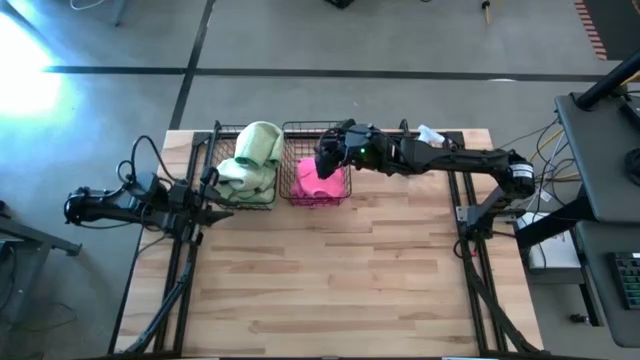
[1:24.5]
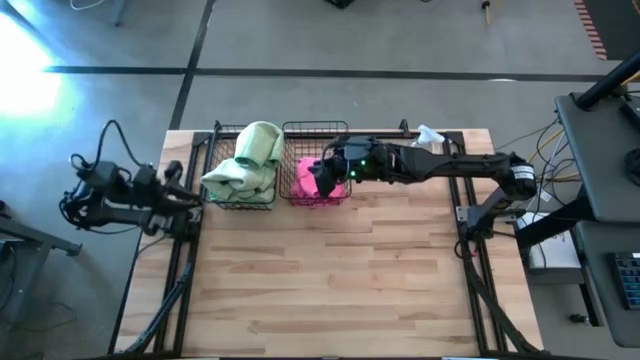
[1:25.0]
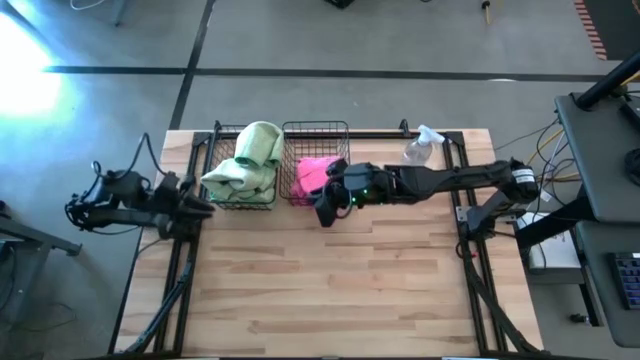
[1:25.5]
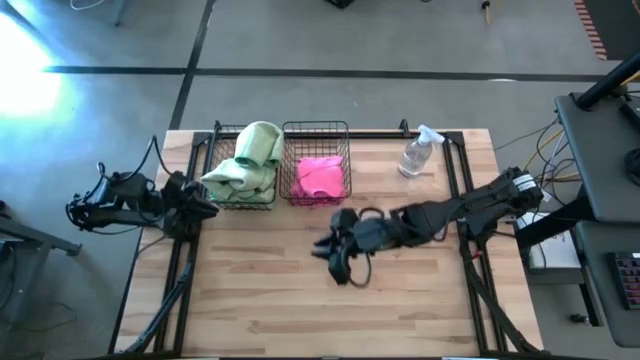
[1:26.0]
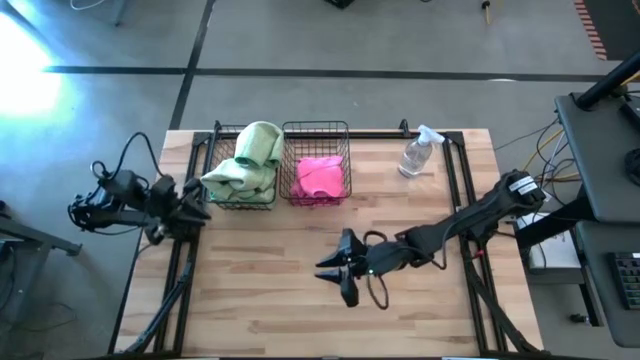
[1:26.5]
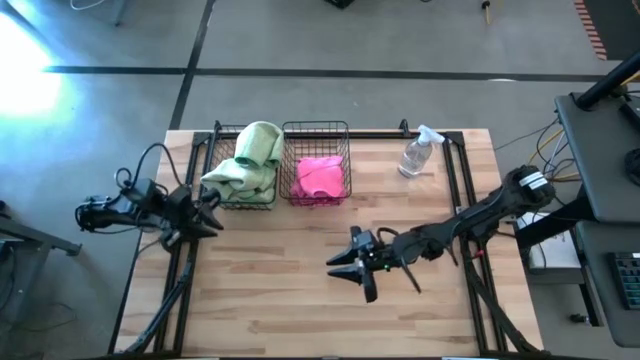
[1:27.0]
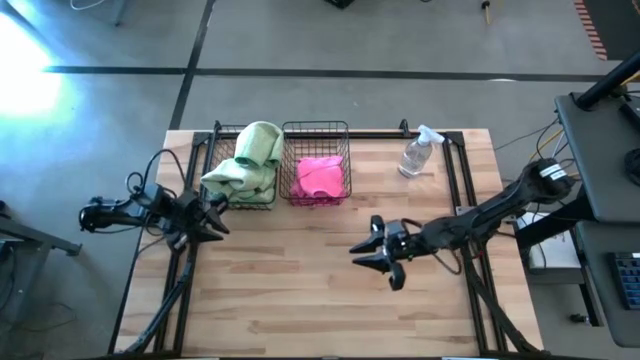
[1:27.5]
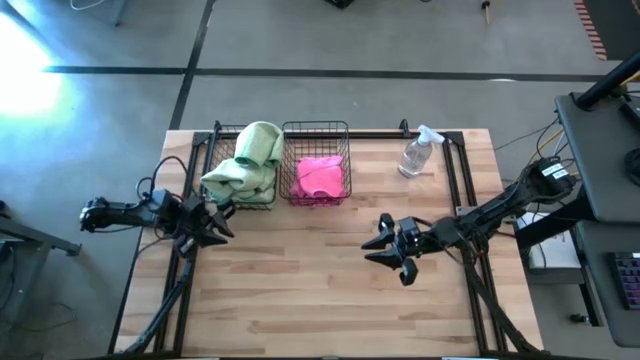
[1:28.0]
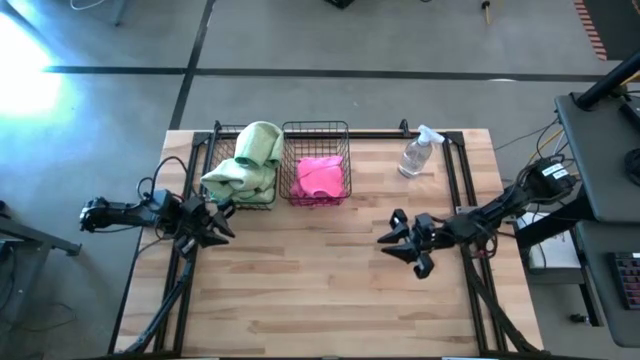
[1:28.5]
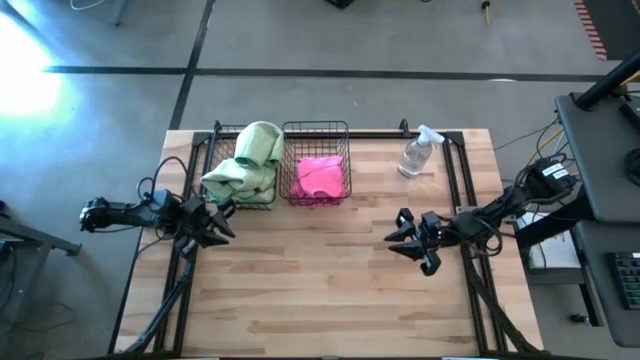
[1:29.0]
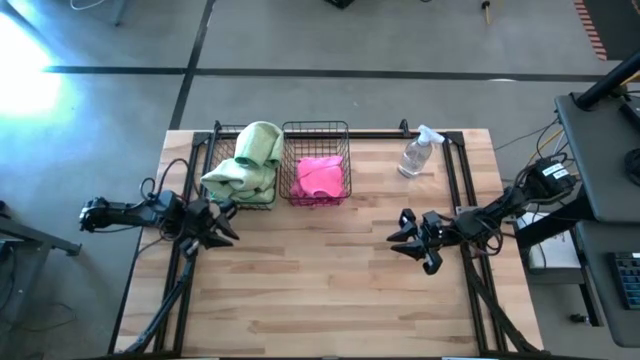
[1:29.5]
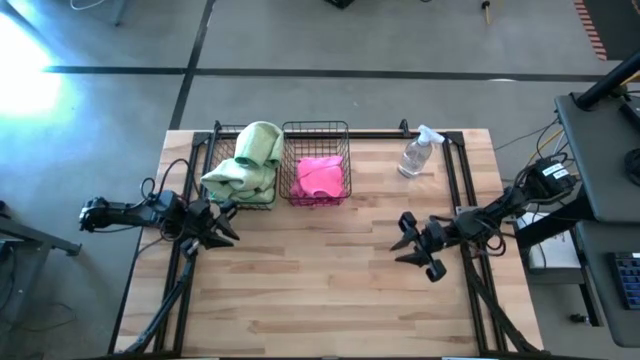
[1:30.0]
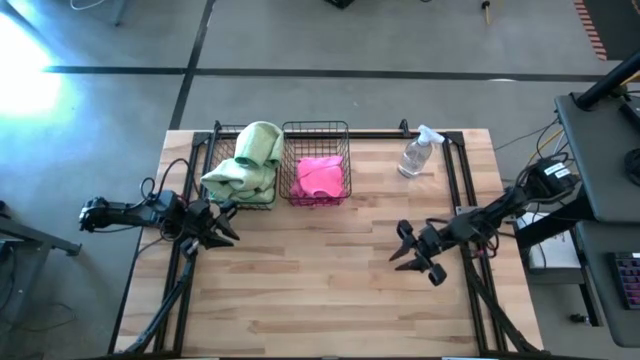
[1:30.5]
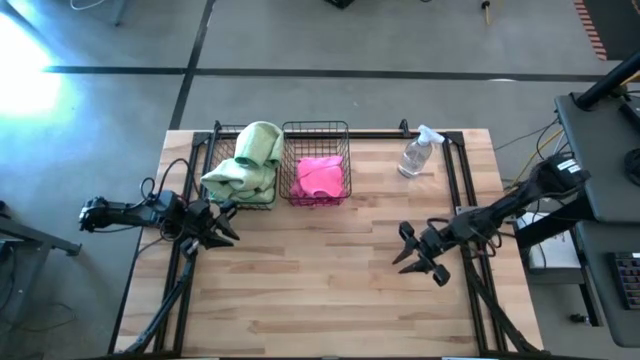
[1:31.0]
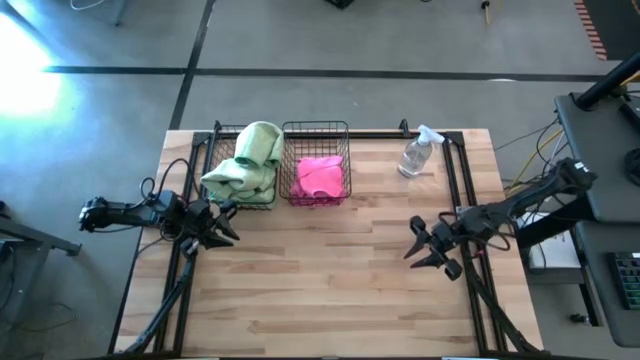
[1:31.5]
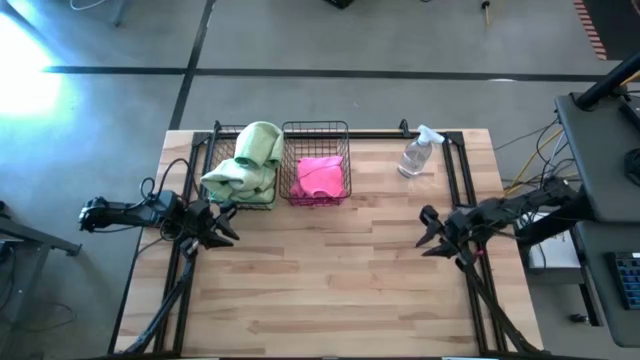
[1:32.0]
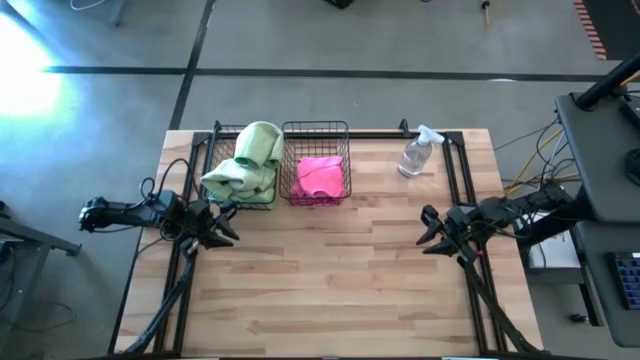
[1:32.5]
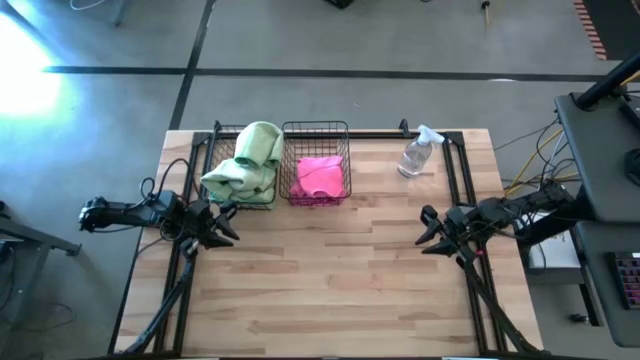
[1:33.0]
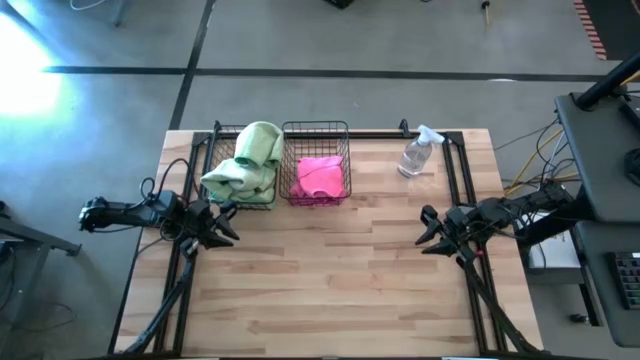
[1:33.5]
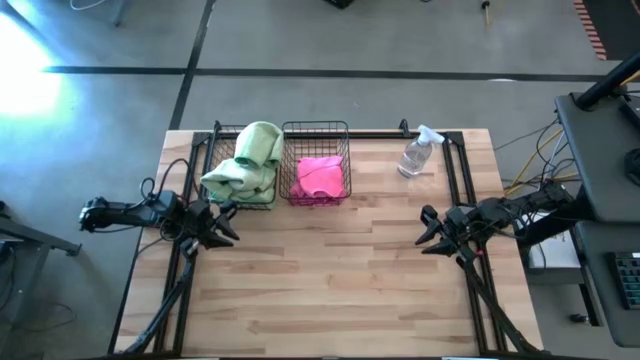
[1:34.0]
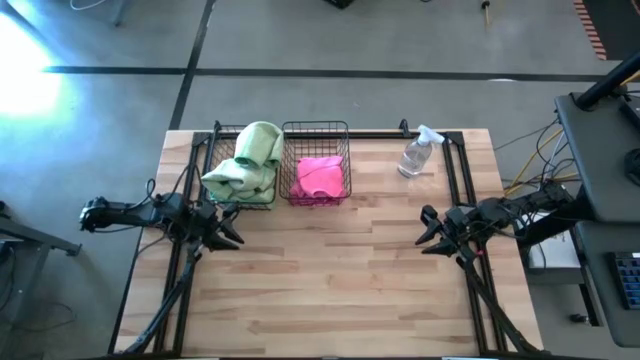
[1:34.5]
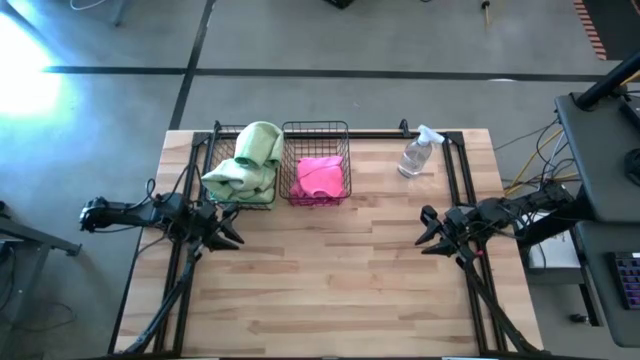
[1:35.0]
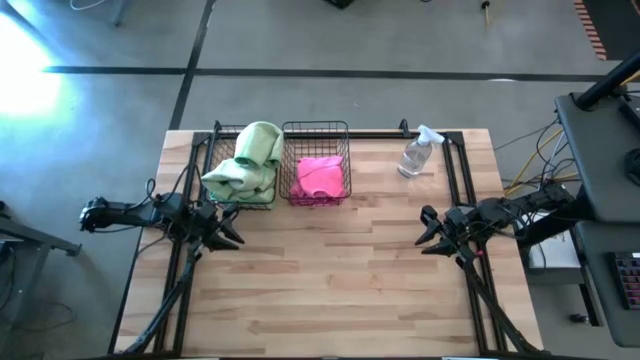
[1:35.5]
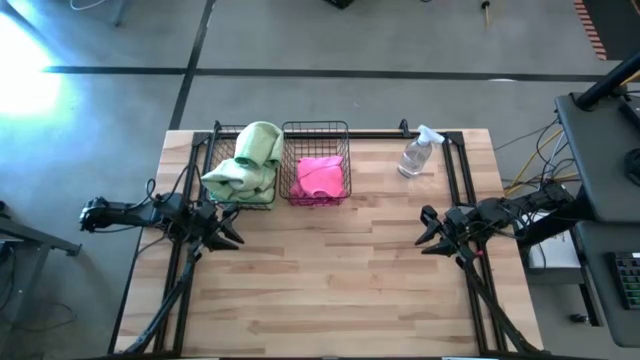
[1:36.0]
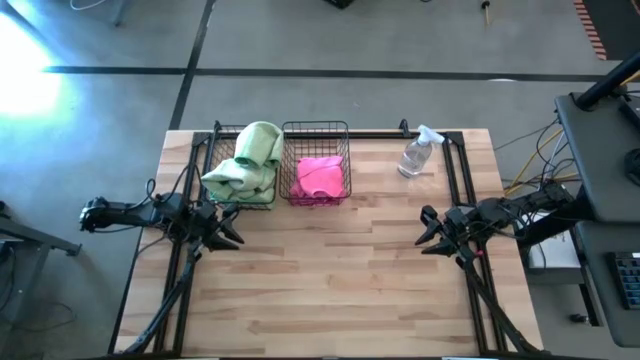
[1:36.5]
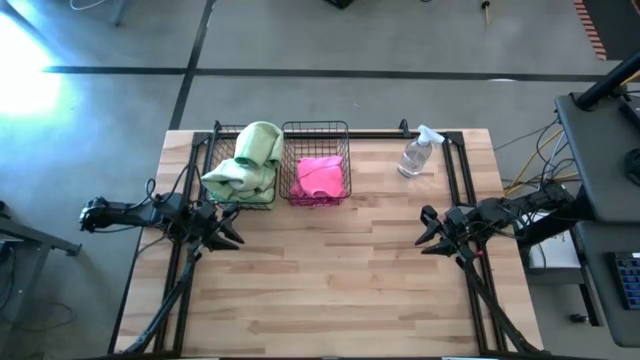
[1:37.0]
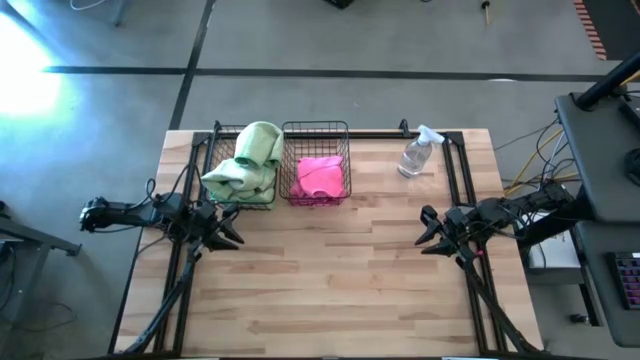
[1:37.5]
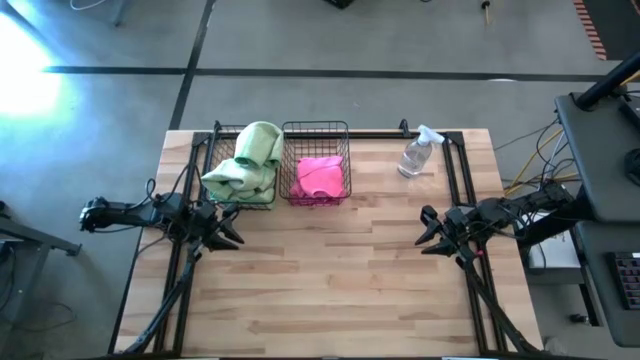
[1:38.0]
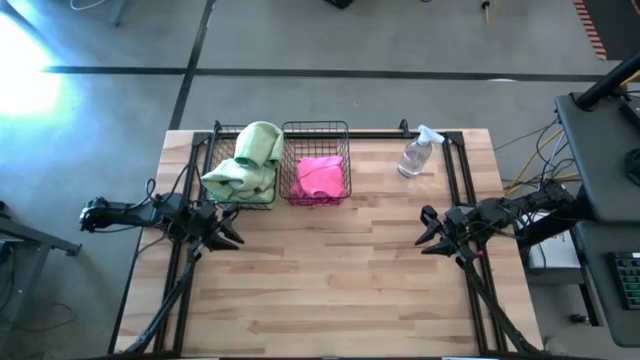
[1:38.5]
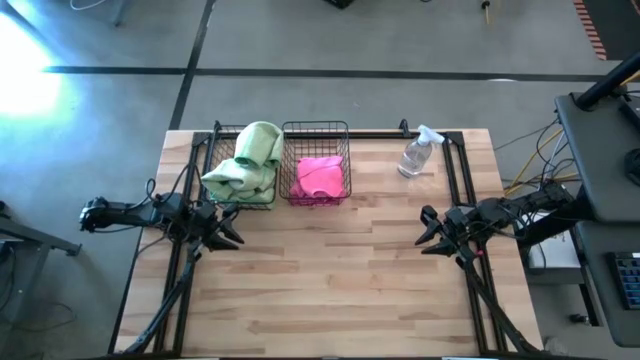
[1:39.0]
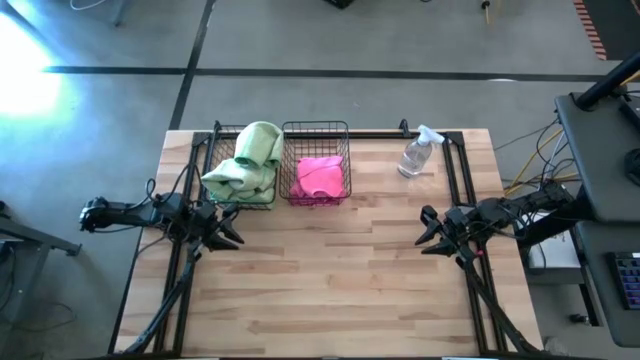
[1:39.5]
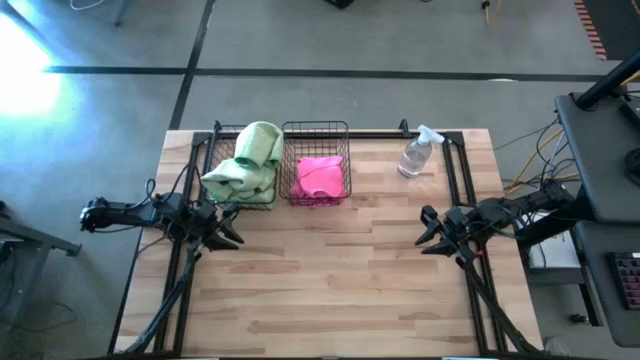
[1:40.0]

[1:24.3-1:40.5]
Task: Sort microfiber towel by color & place in baskets
Return to Home Position

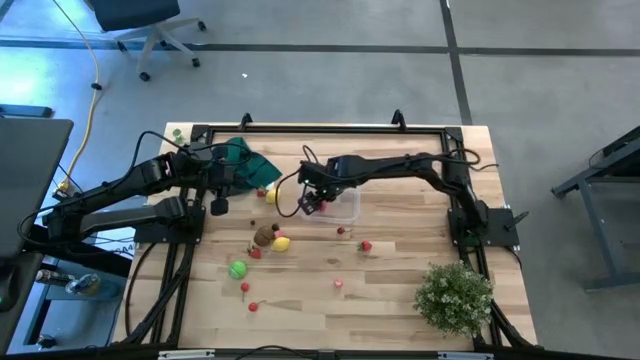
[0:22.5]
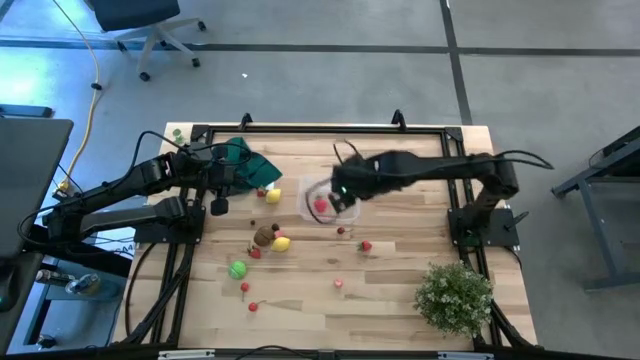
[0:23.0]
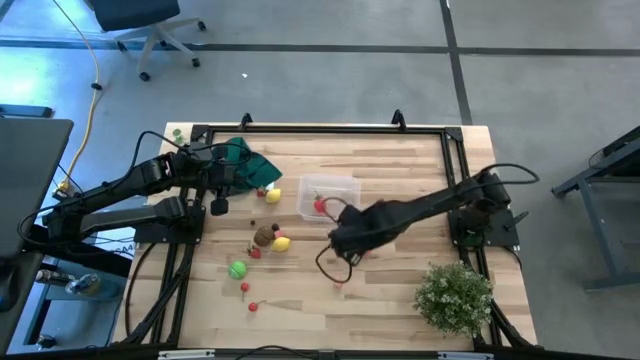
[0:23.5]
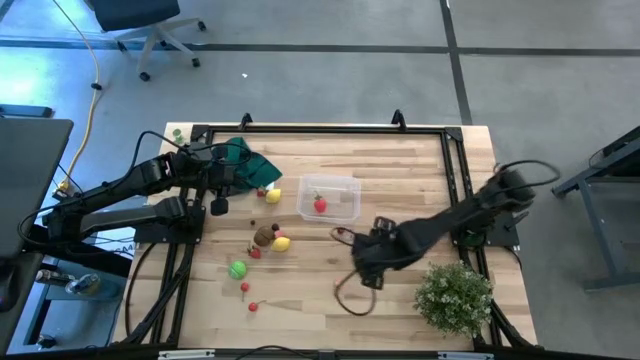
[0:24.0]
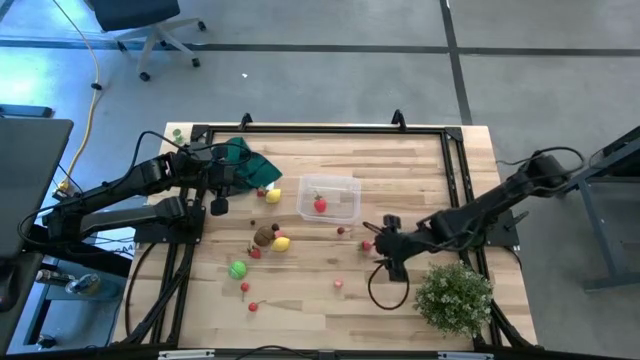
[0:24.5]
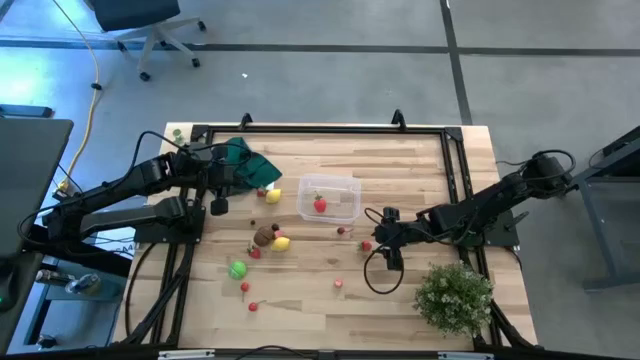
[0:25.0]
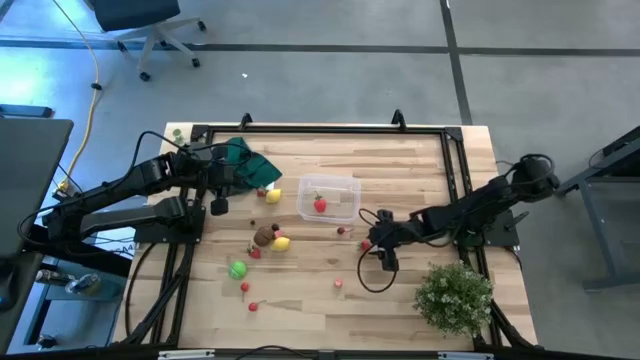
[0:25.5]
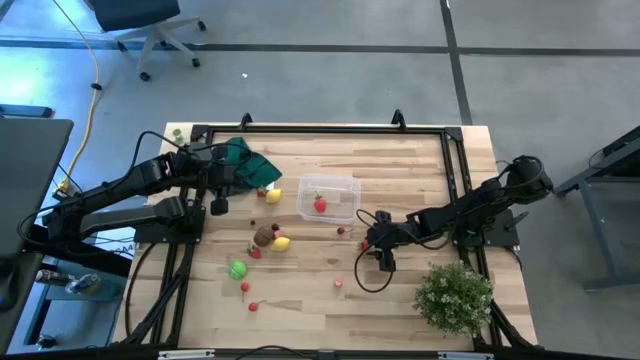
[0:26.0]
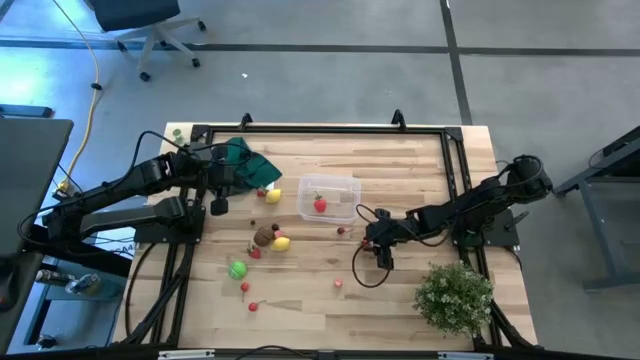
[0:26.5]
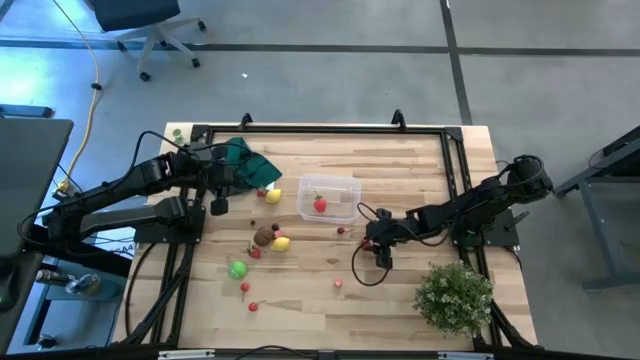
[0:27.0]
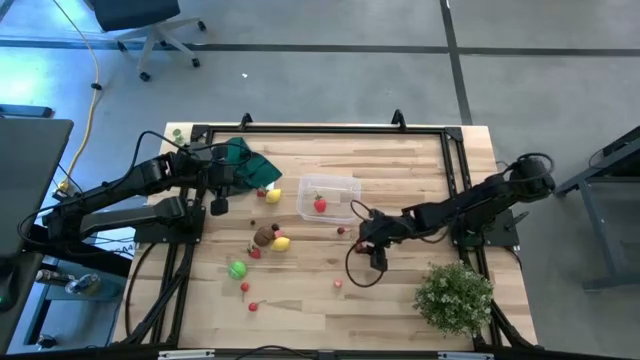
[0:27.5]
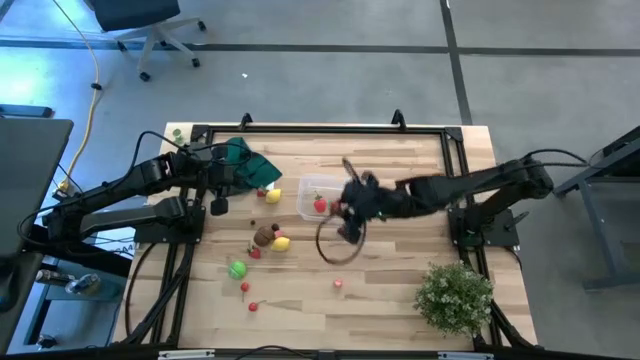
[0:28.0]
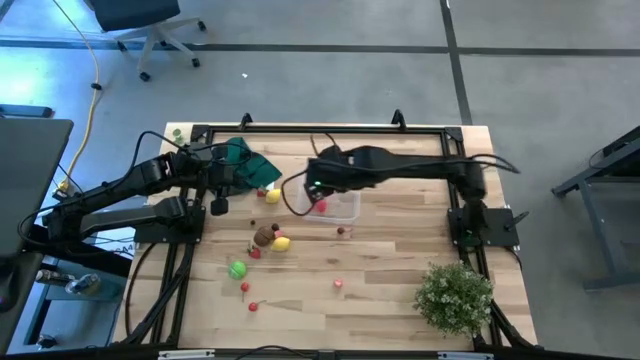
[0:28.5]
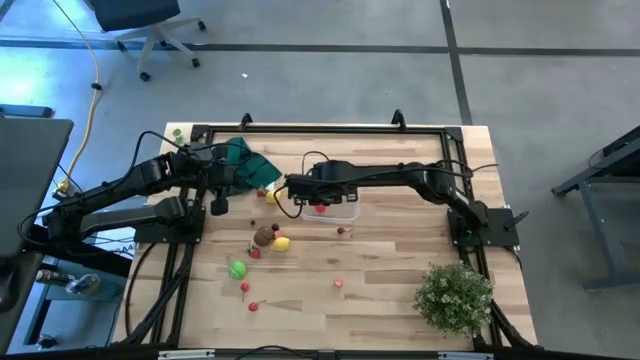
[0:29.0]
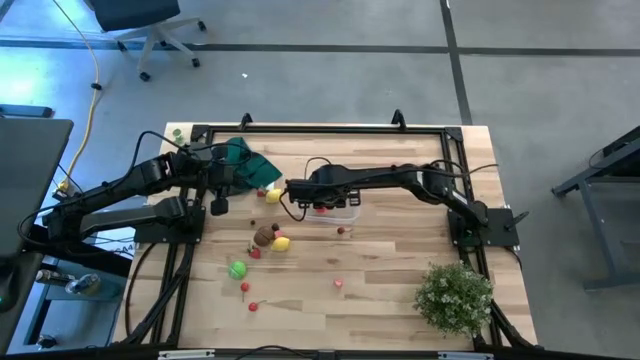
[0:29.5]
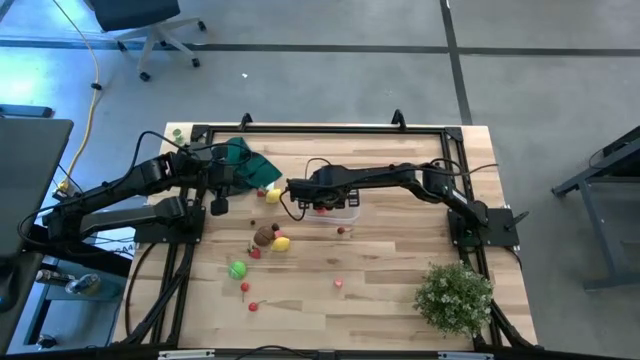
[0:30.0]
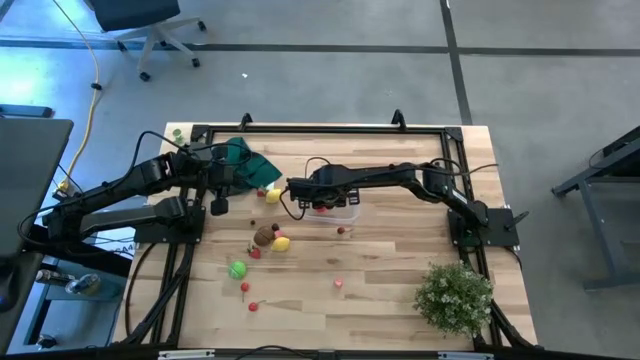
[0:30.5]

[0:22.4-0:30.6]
Task: Pick and placing Produce into tupperware
Put the bottom right red strawberry into the transparent bin
